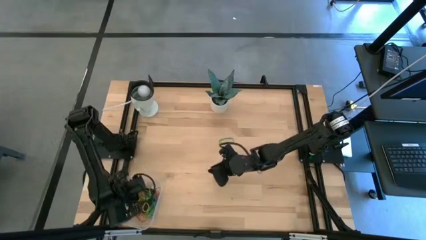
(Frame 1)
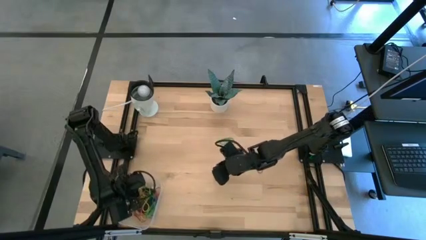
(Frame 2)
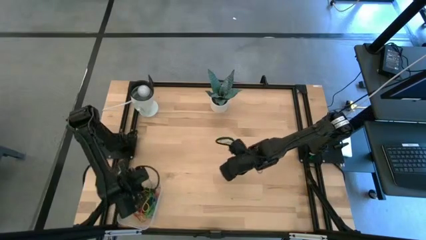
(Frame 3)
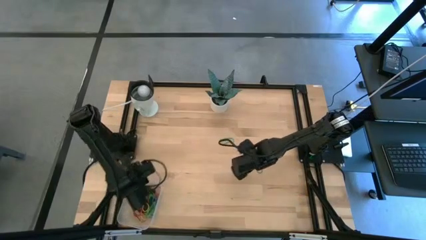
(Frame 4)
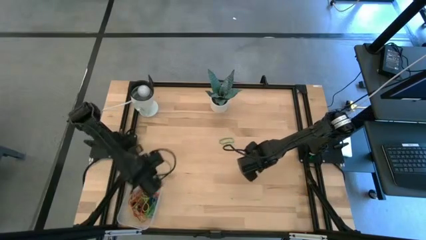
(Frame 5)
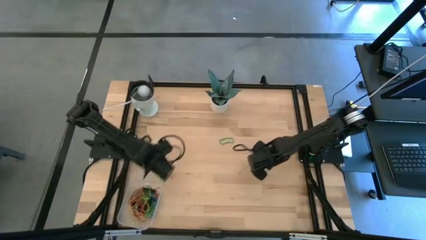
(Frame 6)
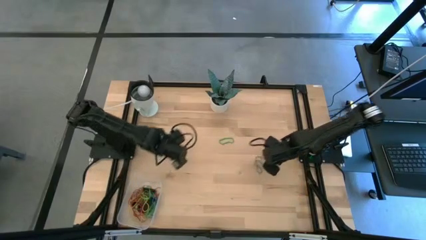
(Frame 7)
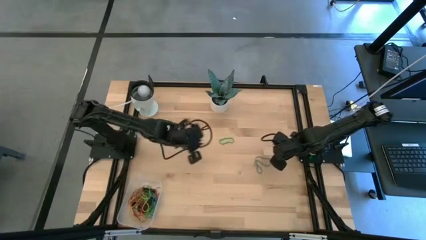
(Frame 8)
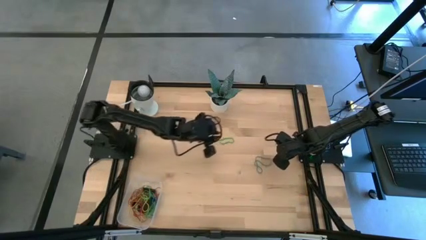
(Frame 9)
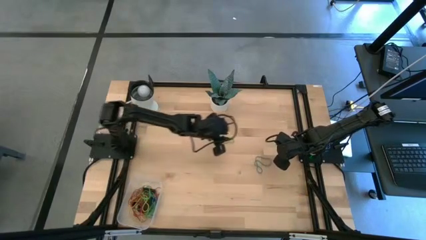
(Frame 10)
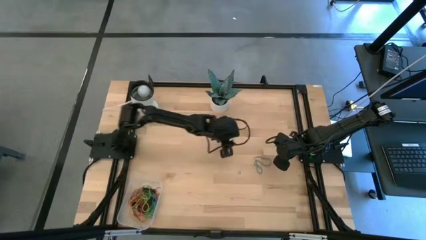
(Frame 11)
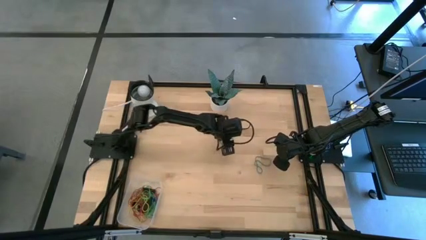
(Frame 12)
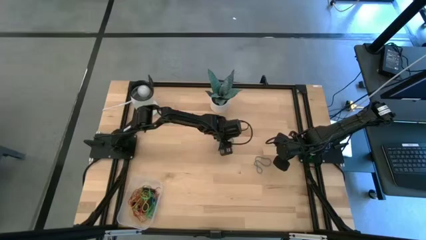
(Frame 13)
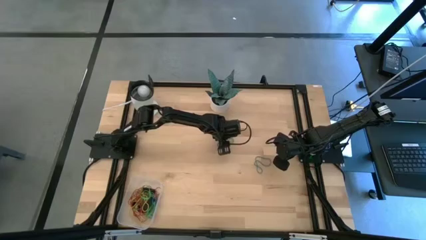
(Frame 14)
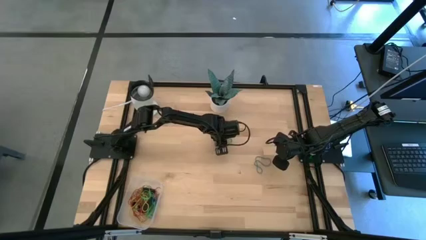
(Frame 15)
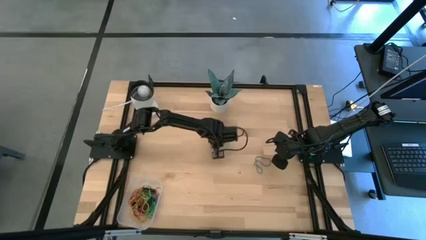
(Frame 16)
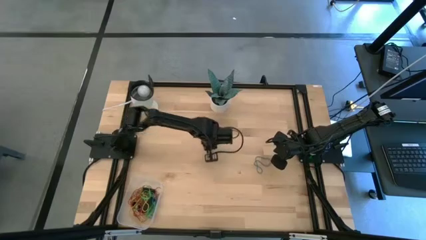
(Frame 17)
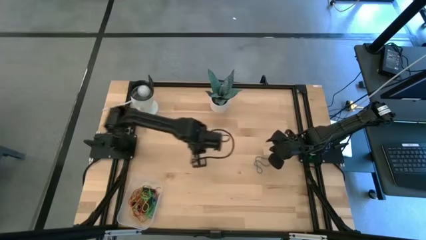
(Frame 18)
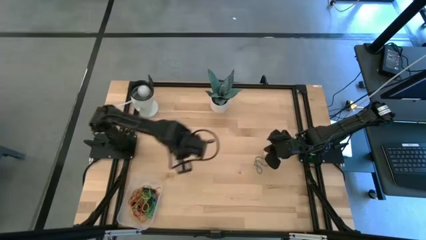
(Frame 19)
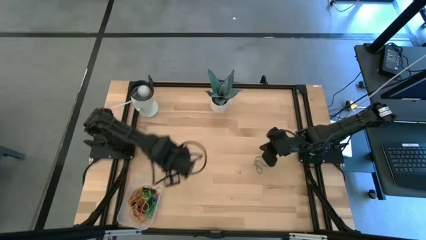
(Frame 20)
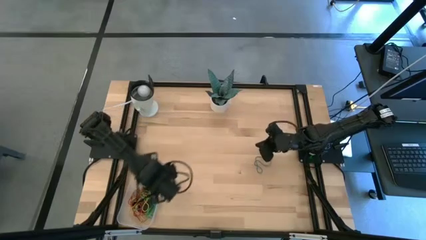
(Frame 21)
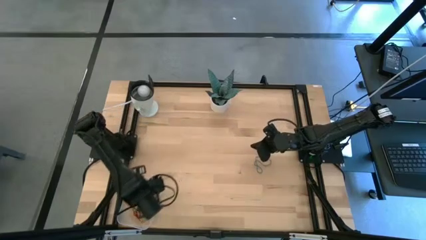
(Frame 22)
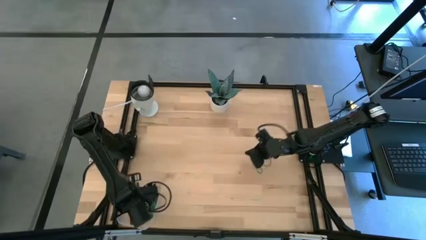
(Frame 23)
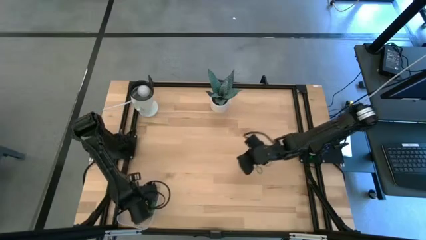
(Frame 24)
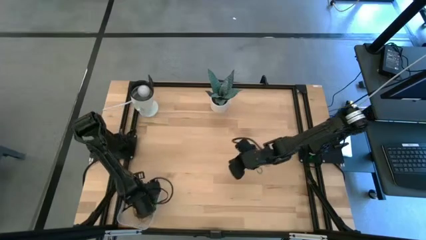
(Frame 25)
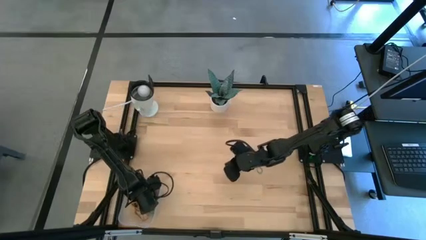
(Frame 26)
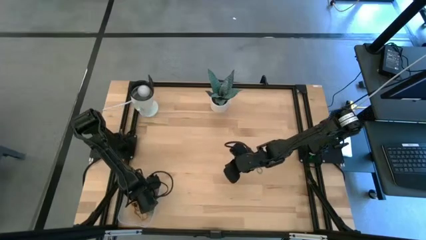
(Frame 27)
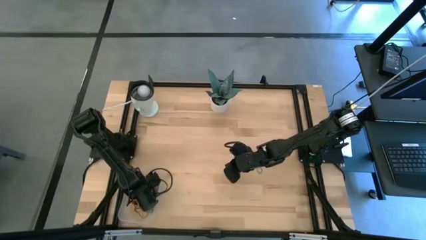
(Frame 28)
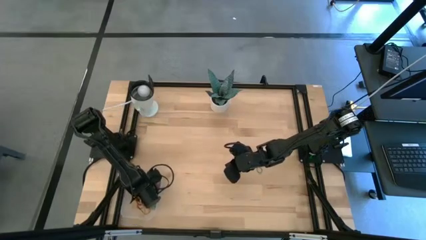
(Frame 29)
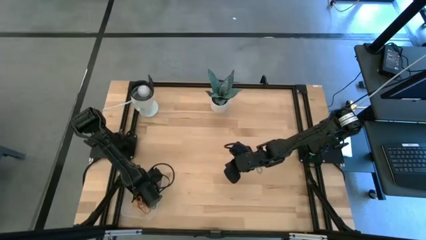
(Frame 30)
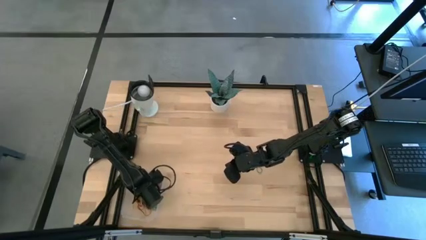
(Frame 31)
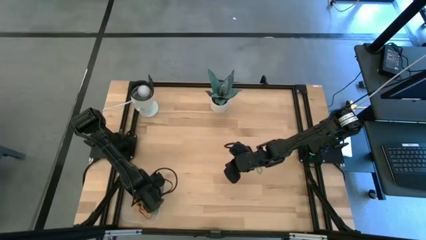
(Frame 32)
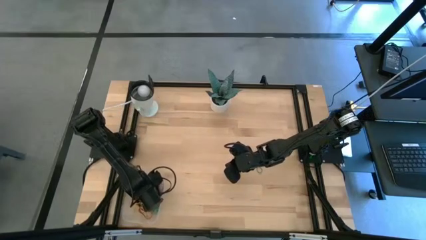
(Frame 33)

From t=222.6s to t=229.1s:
Task: Pick and place rubber bands into bin
Put the green rubber band into the transparent bin

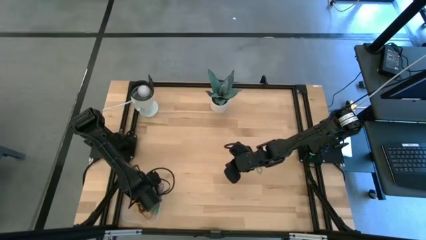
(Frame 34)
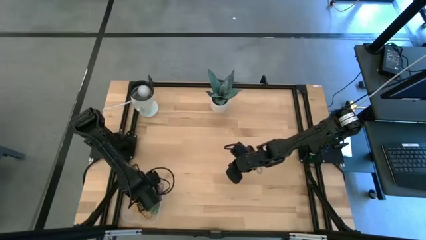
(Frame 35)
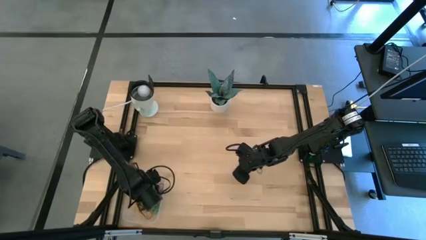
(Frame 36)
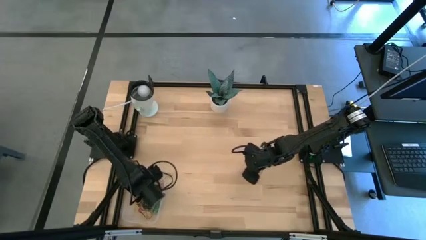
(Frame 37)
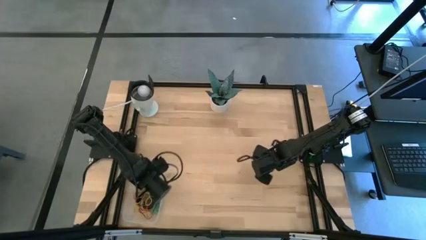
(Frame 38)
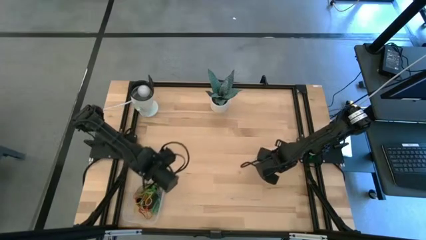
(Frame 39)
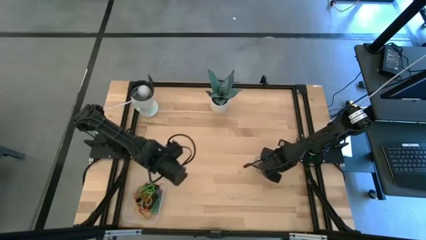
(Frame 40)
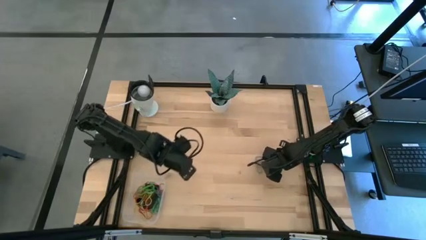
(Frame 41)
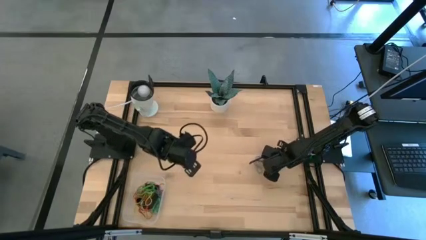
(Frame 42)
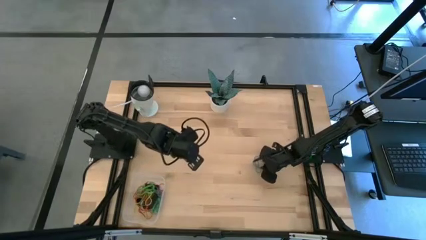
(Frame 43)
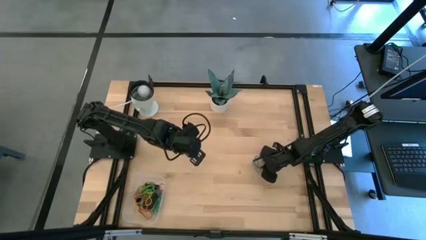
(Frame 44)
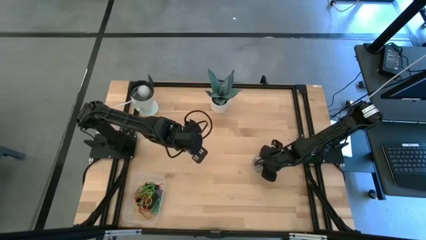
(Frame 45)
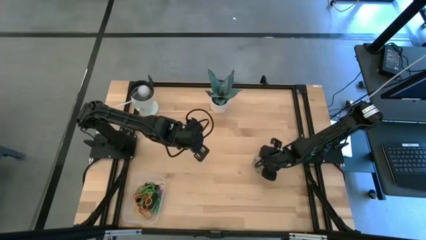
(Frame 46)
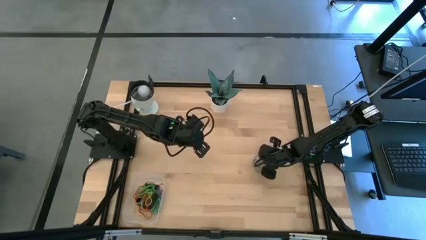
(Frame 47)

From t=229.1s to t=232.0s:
Put the blue rubber band into the transparent bin

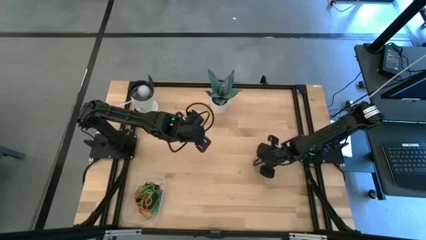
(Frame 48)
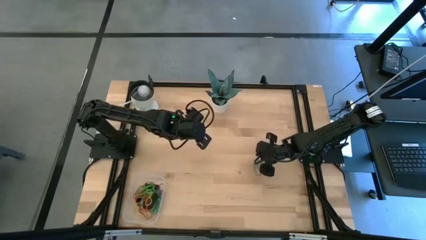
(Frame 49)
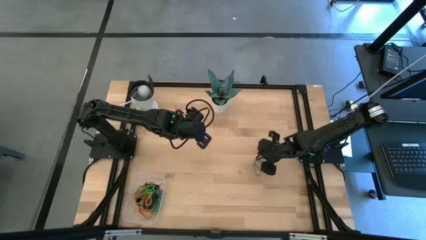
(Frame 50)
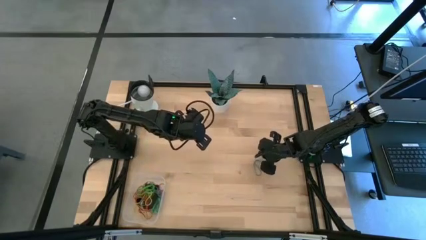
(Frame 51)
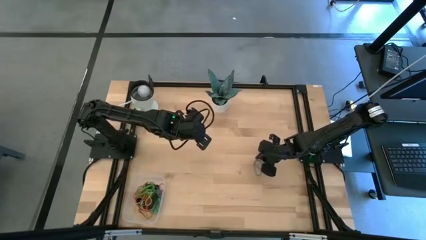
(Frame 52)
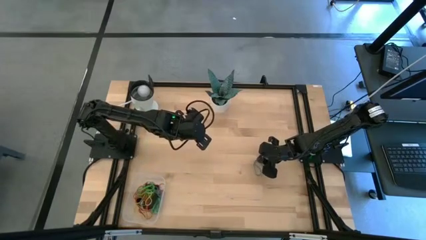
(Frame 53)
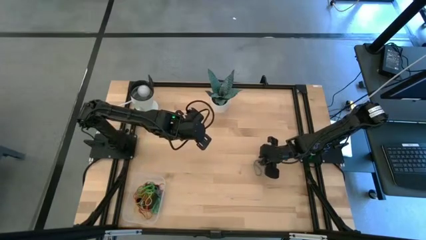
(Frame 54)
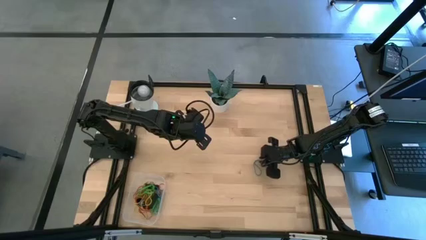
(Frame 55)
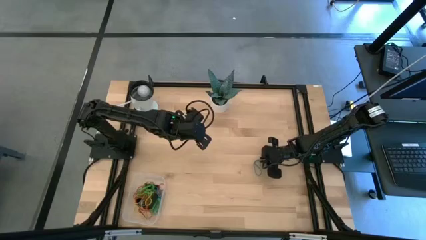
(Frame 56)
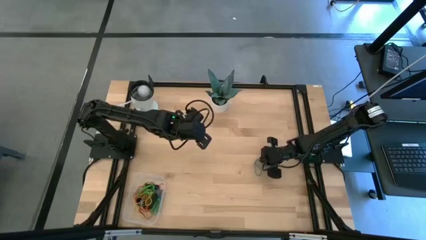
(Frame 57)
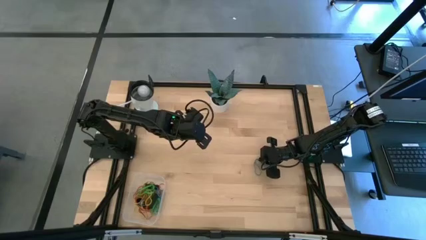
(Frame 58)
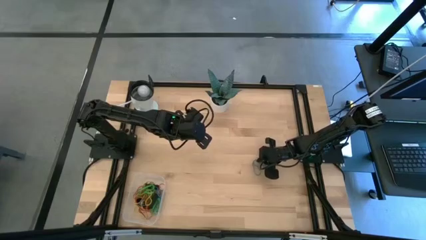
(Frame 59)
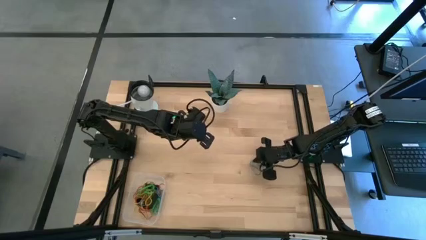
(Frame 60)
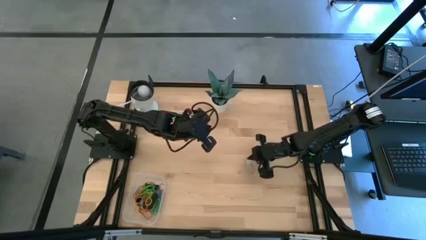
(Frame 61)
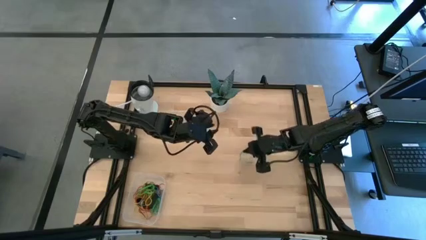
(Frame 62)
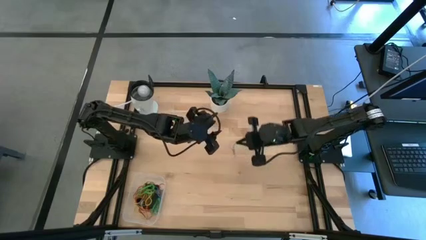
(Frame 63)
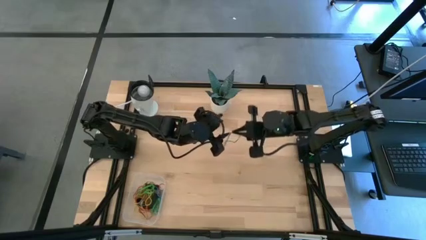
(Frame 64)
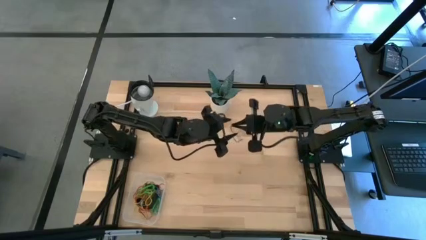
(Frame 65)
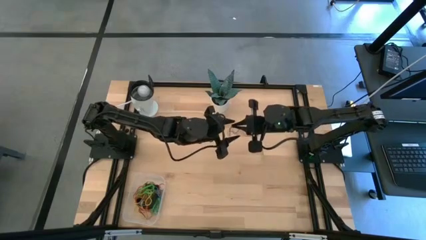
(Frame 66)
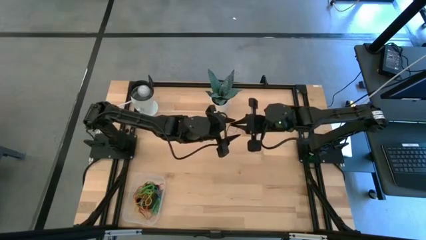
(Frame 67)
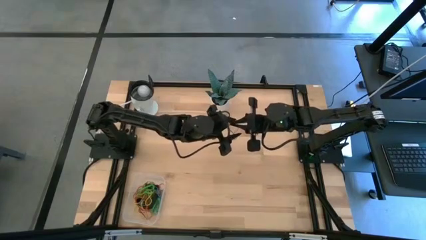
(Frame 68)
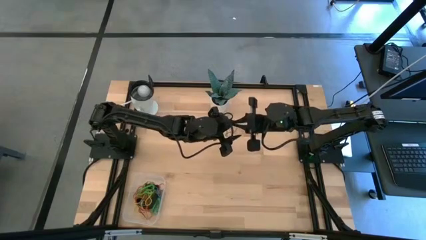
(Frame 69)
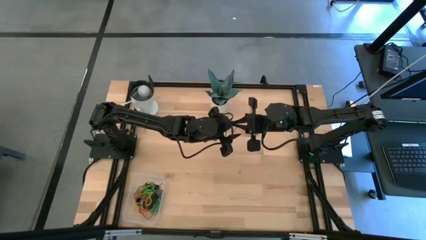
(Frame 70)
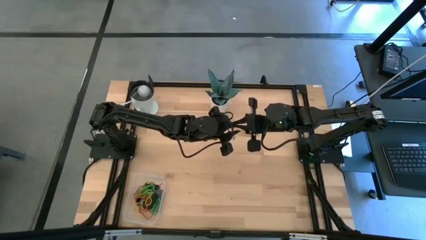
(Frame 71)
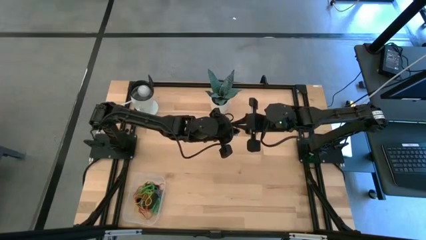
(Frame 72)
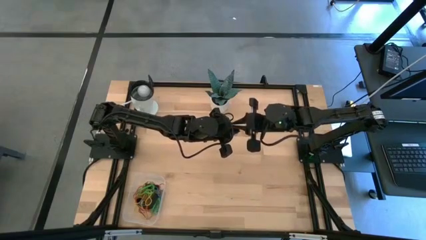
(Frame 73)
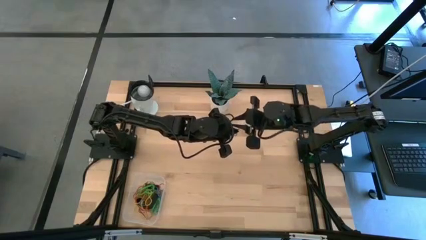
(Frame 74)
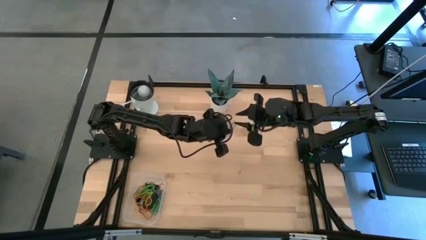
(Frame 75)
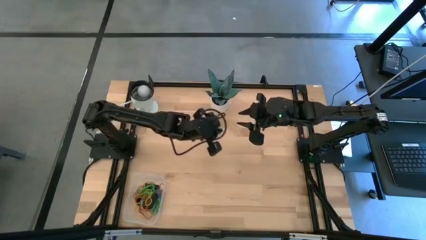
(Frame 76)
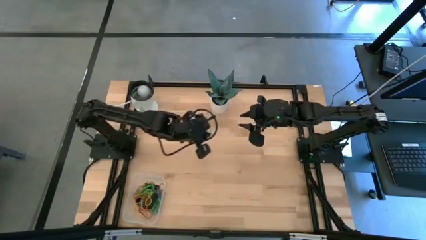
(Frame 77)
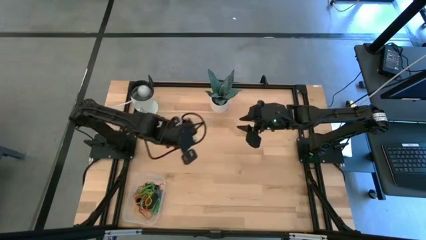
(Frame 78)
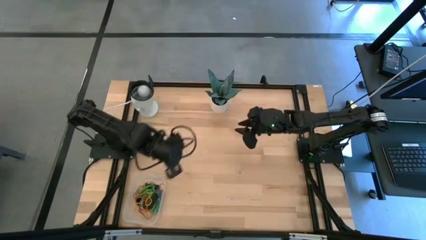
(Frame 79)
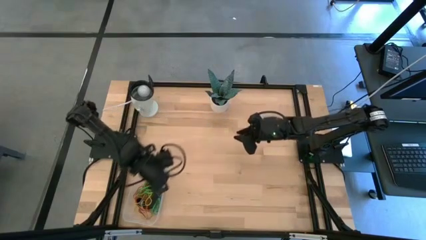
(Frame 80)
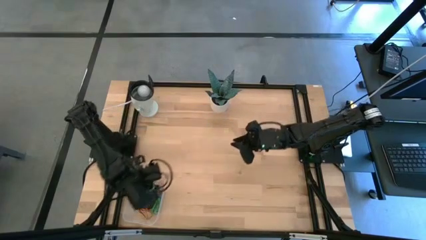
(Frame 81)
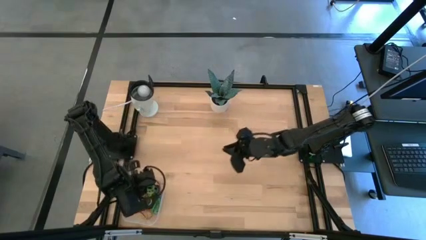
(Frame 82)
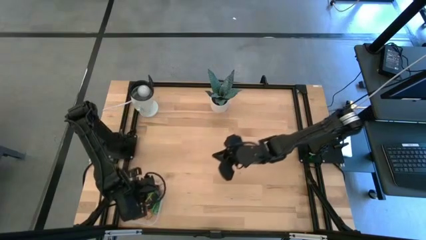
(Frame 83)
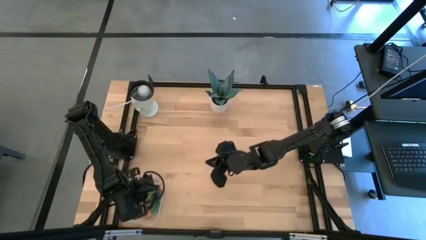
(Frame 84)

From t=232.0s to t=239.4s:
Put the blue rubber band into the transparent bin

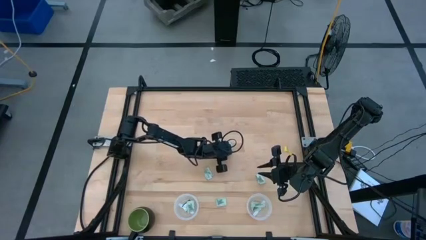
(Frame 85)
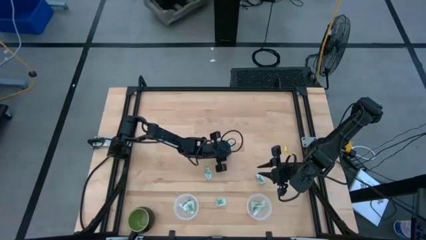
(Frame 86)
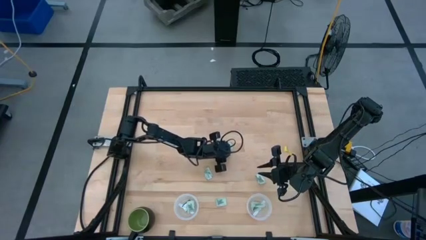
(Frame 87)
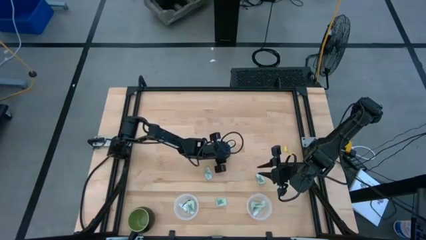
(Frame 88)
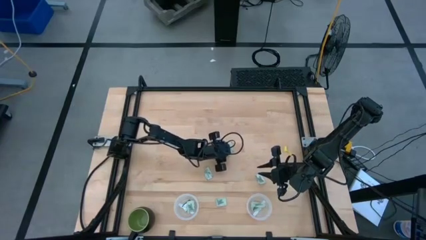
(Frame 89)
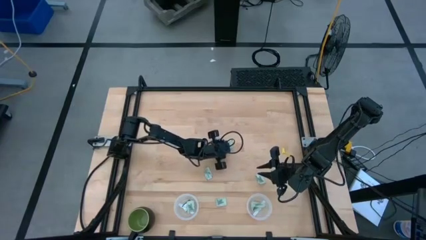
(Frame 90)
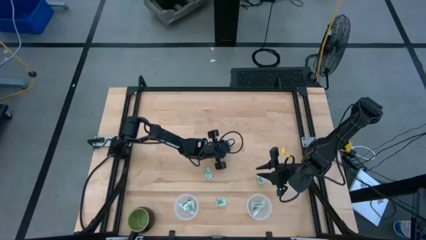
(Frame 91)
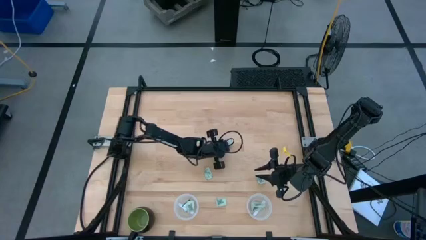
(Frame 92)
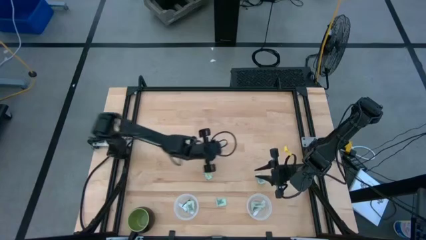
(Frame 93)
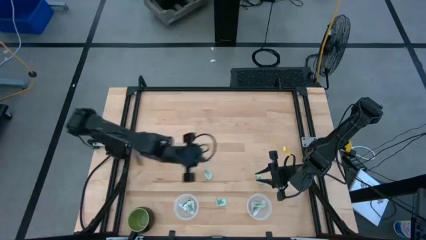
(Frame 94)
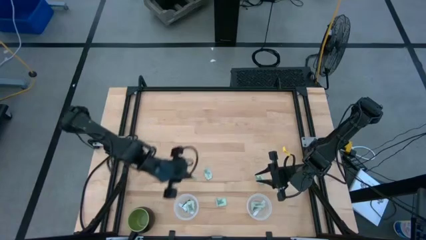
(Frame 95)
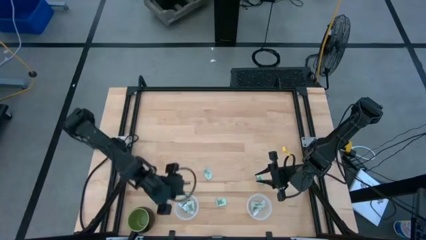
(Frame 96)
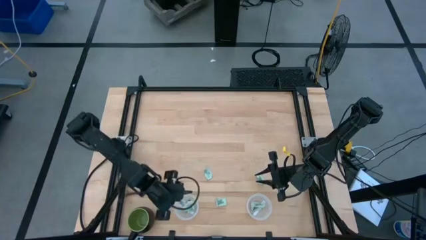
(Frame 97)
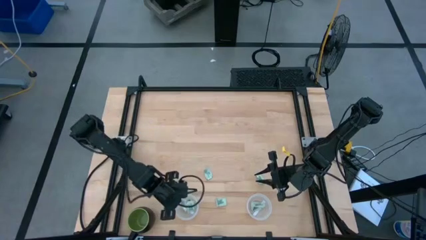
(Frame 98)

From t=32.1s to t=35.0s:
Task: Pick and place Stevia / Truvia into bins
Put the stevia packet into the left transparent container
